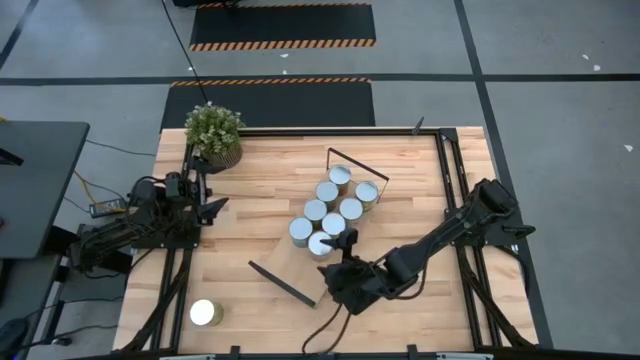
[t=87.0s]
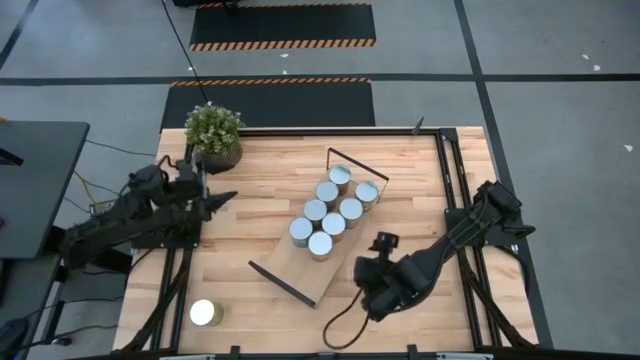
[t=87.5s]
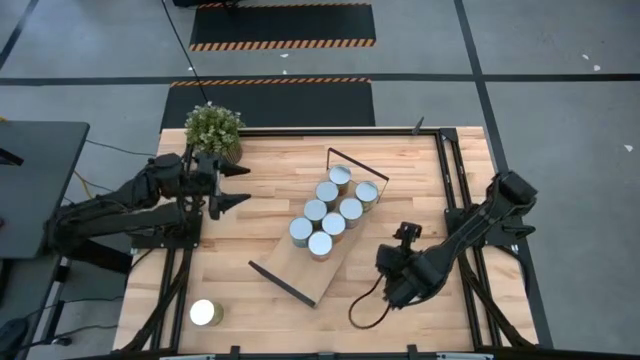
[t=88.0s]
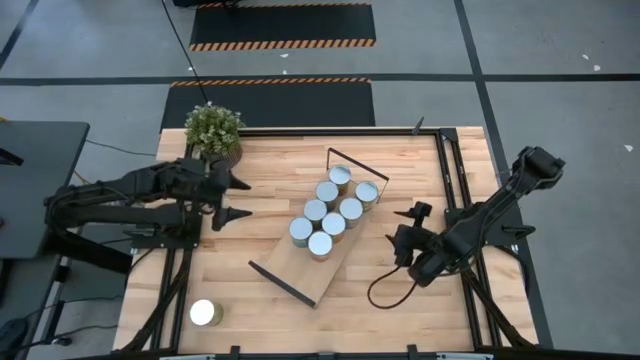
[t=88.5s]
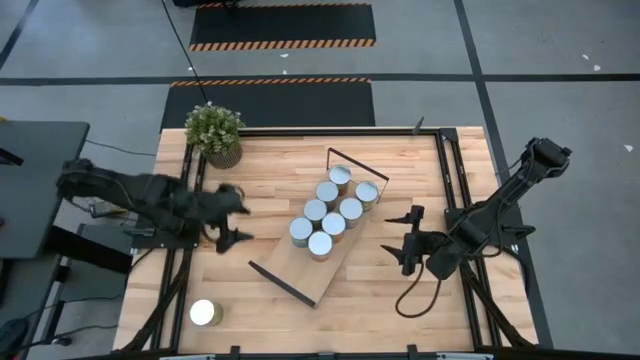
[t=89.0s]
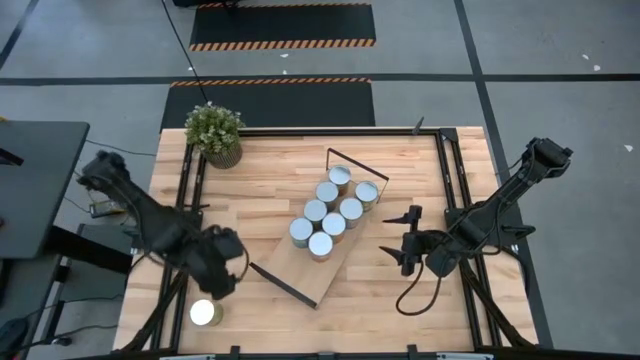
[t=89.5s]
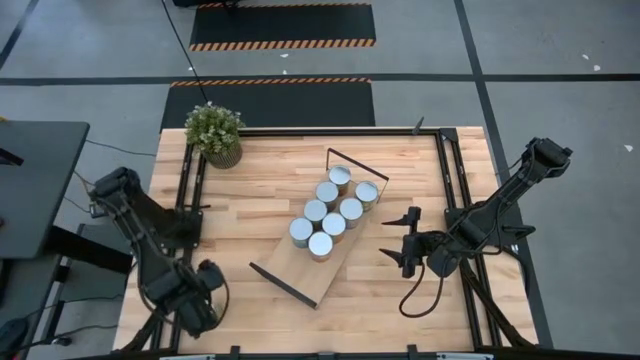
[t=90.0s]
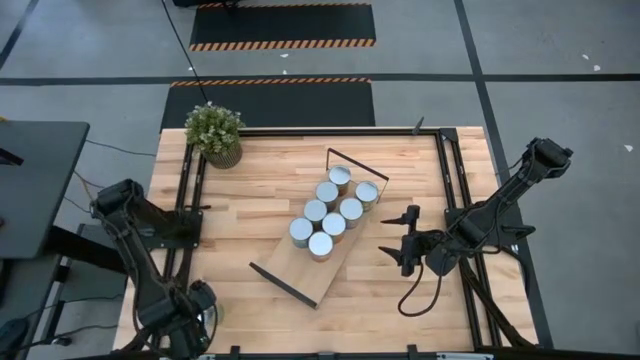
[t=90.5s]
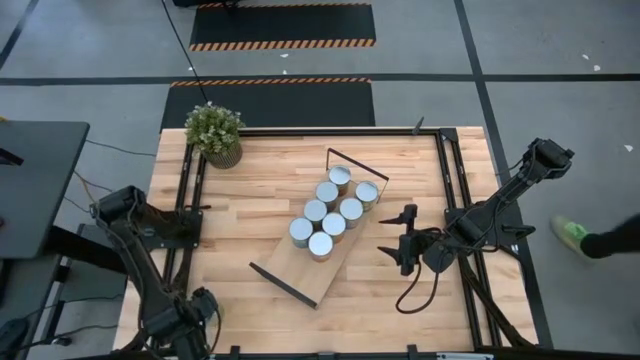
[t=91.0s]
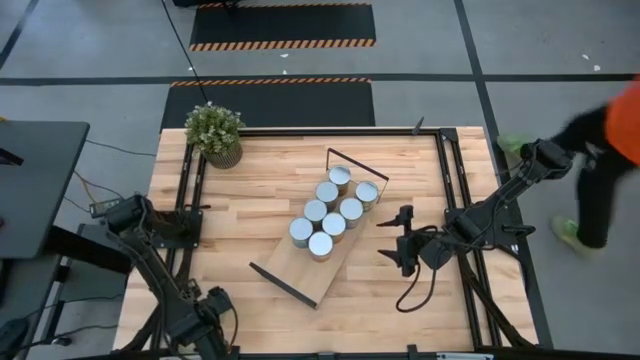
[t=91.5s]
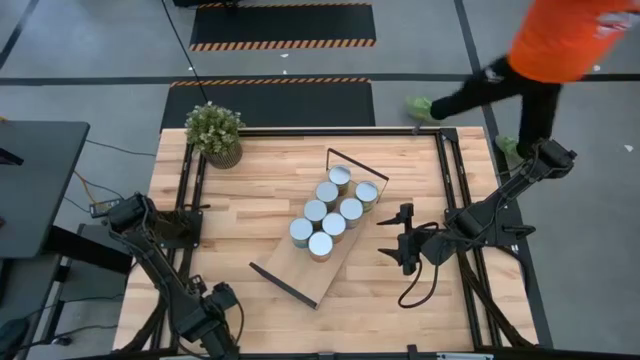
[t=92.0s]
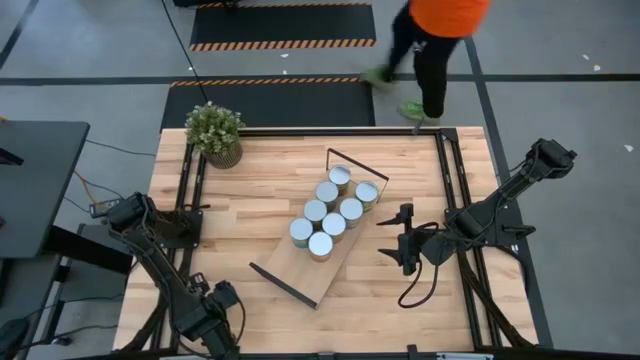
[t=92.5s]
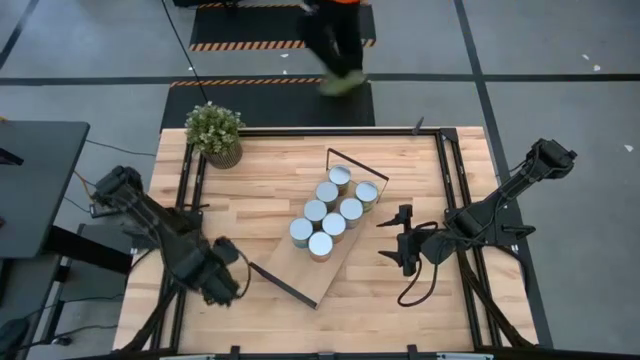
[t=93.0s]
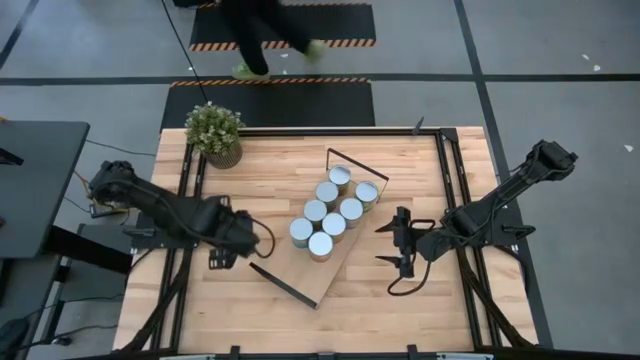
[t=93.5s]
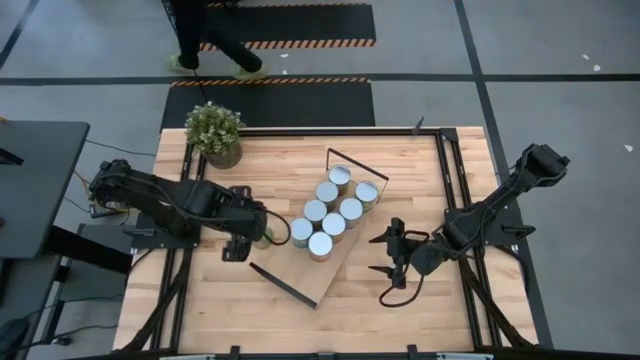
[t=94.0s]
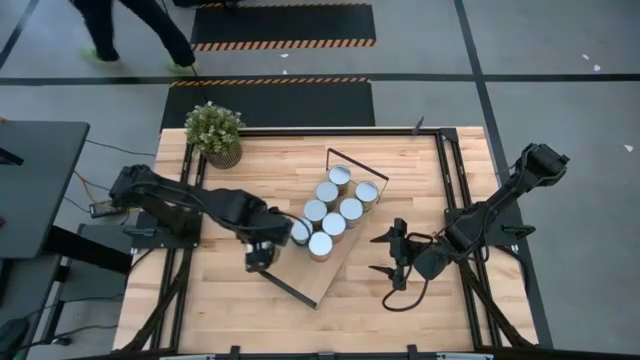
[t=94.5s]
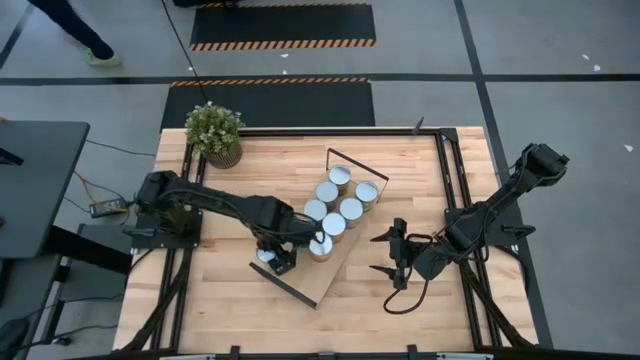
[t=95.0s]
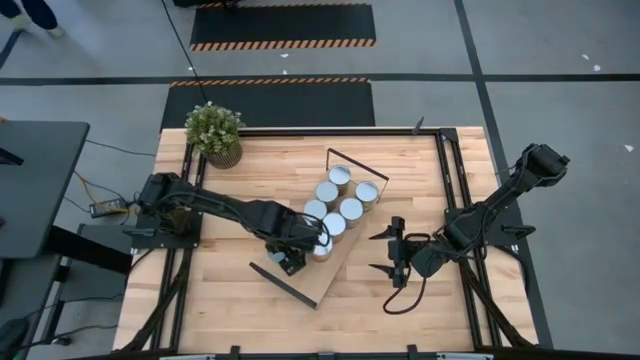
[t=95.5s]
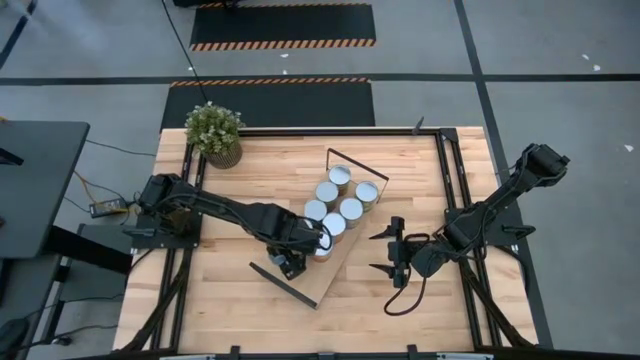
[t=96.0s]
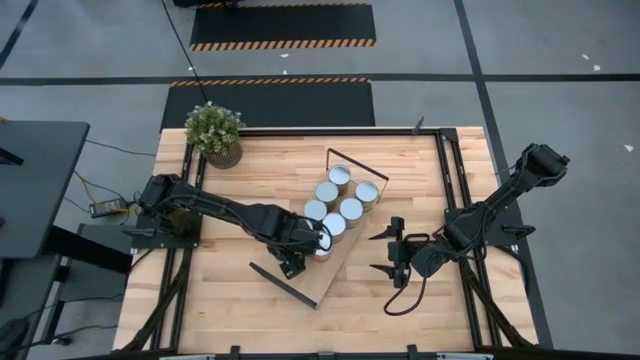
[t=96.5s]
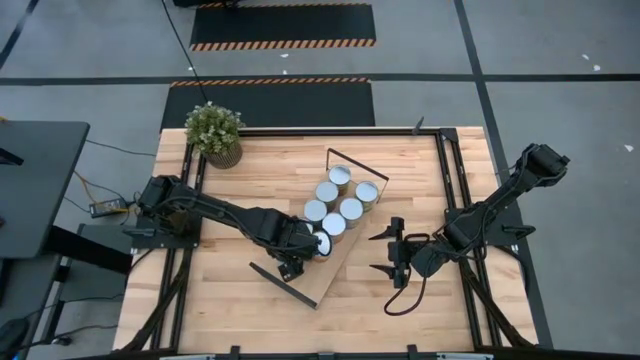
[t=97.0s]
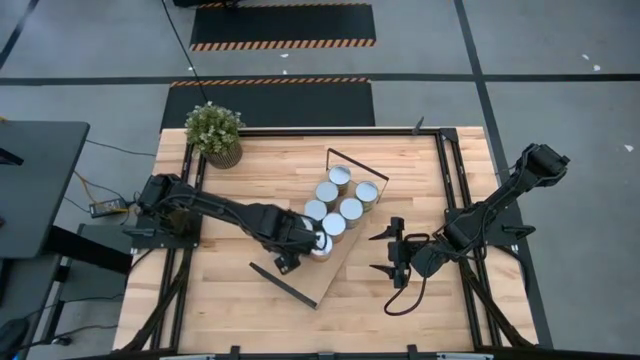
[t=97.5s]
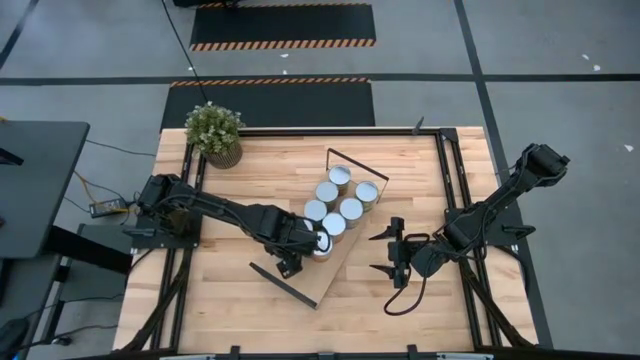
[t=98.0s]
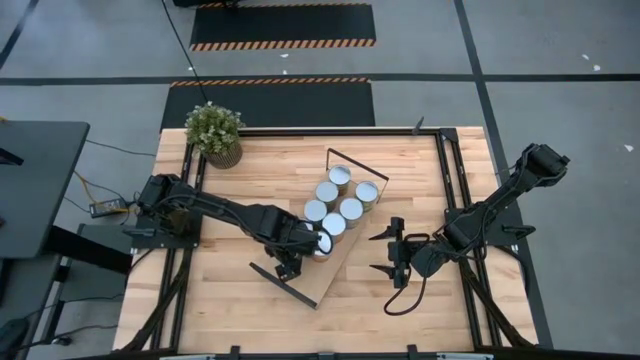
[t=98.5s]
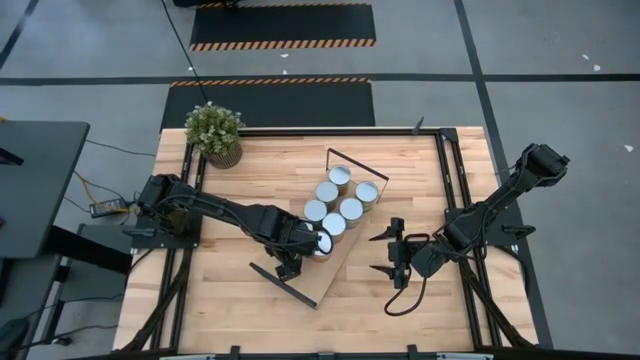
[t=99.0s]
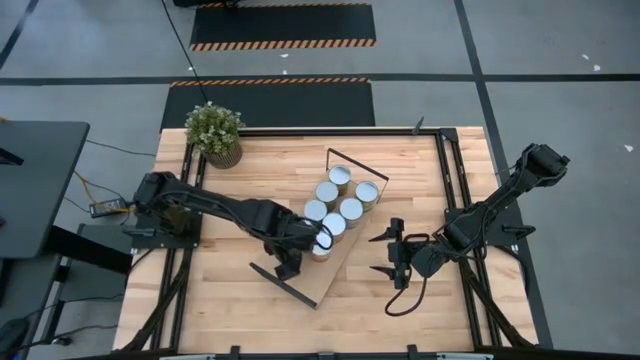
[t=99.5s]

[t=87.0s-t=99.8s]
Task: Pick and place cans onto a shelf
Put the canned oranges on the shelf

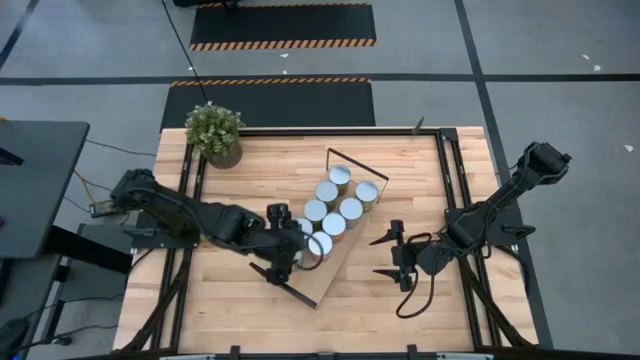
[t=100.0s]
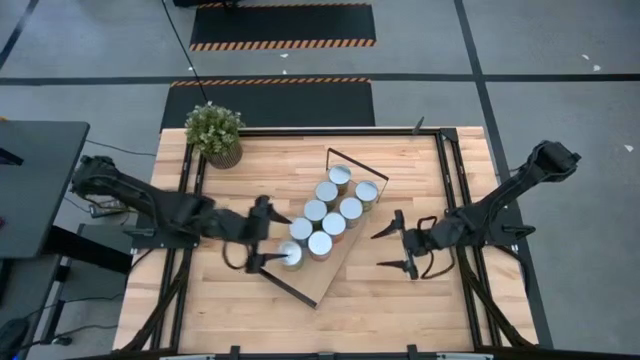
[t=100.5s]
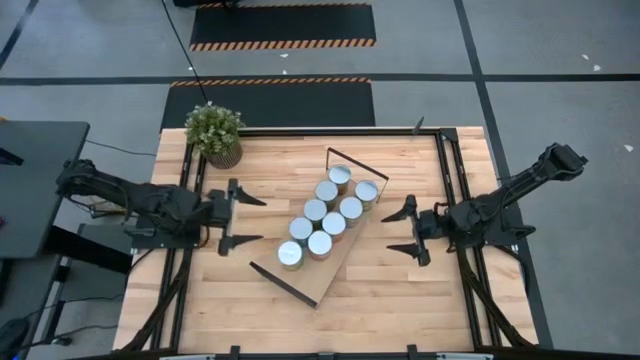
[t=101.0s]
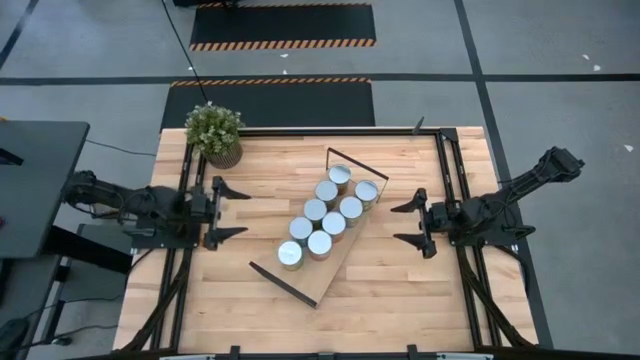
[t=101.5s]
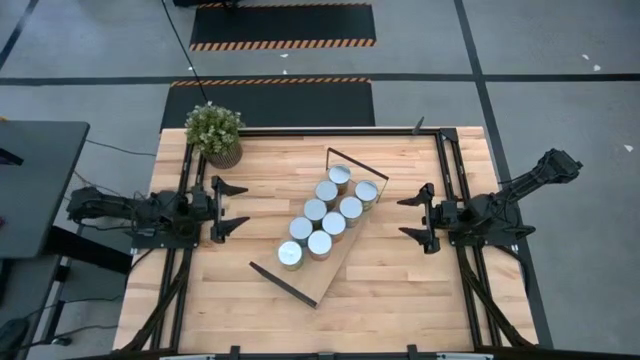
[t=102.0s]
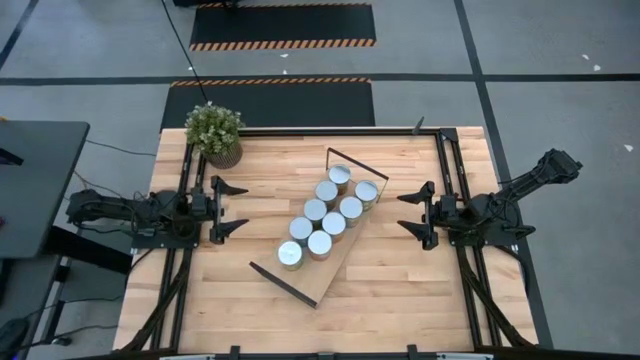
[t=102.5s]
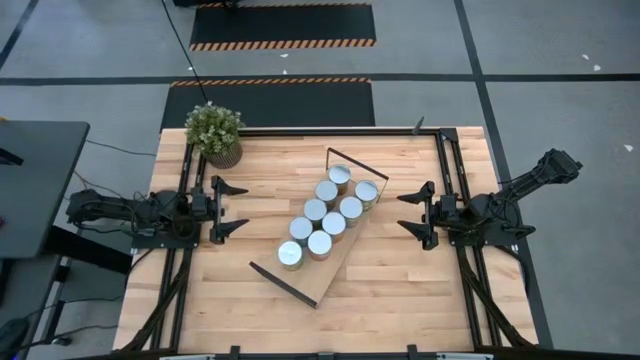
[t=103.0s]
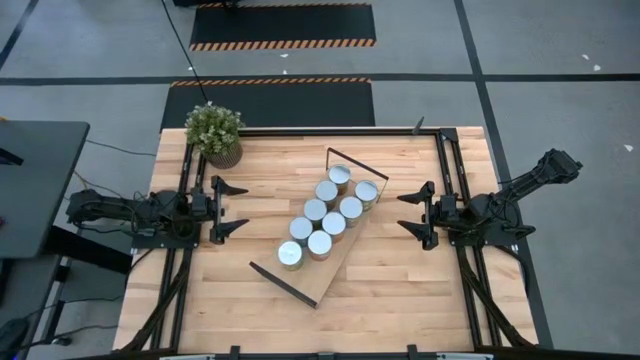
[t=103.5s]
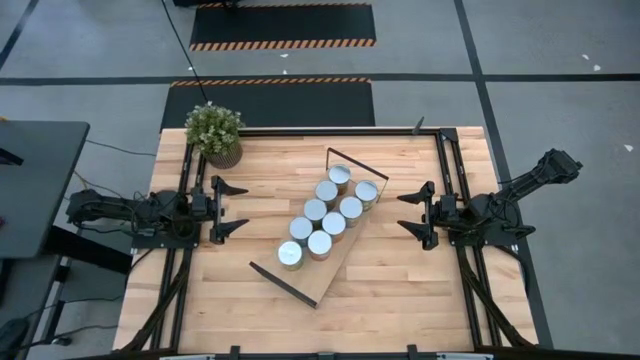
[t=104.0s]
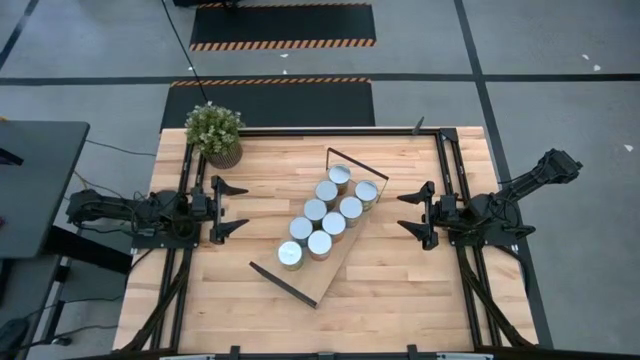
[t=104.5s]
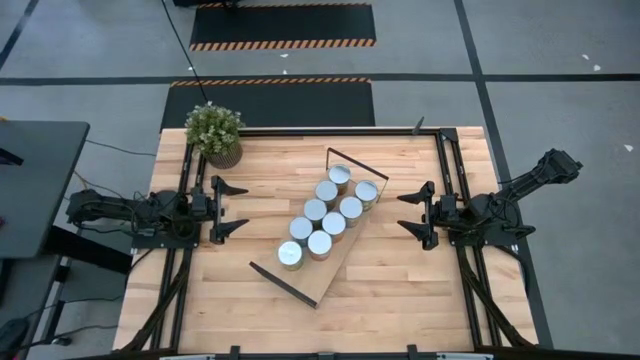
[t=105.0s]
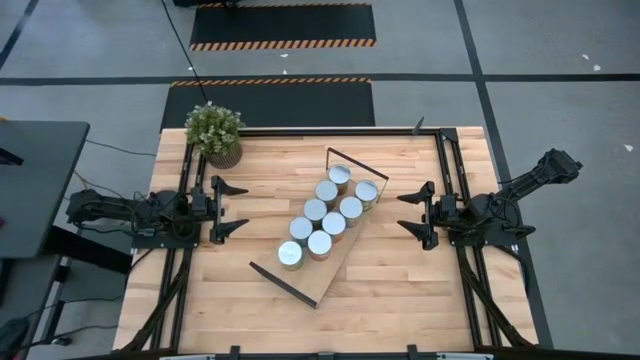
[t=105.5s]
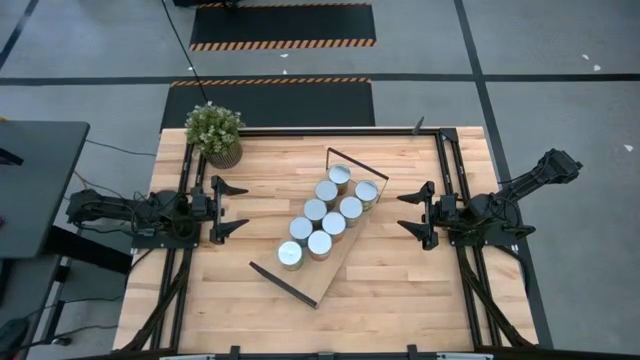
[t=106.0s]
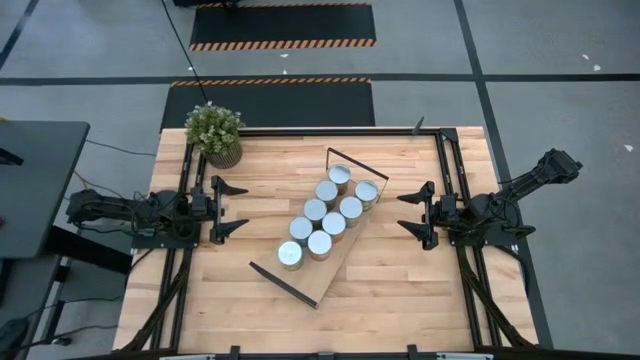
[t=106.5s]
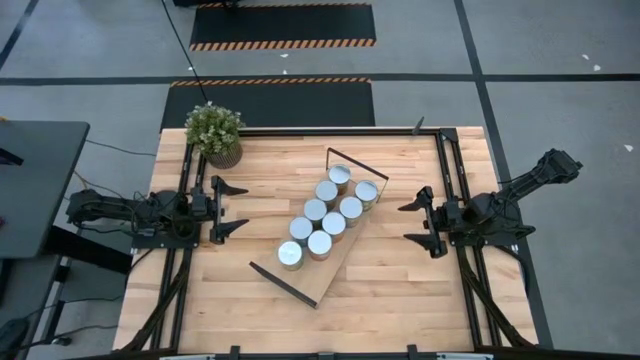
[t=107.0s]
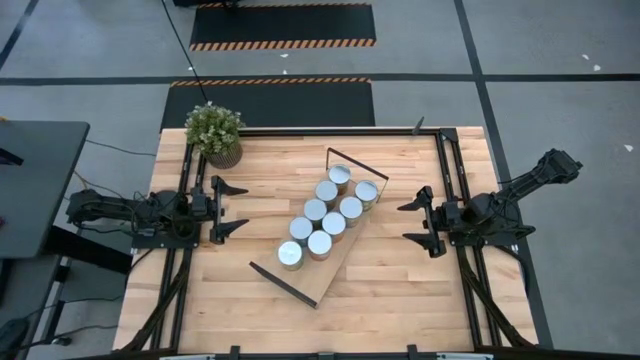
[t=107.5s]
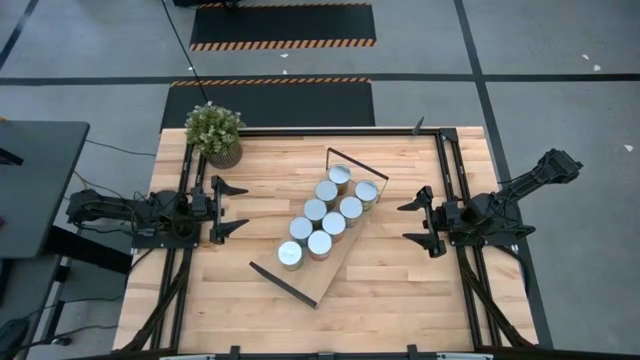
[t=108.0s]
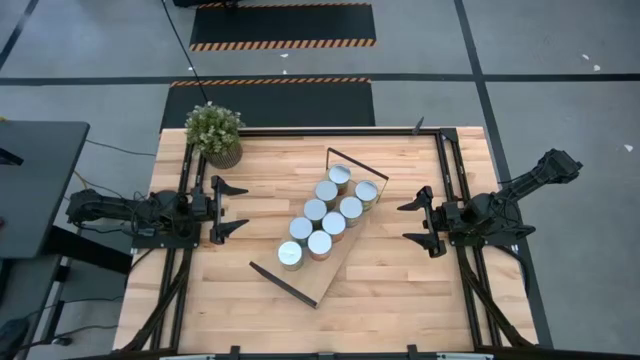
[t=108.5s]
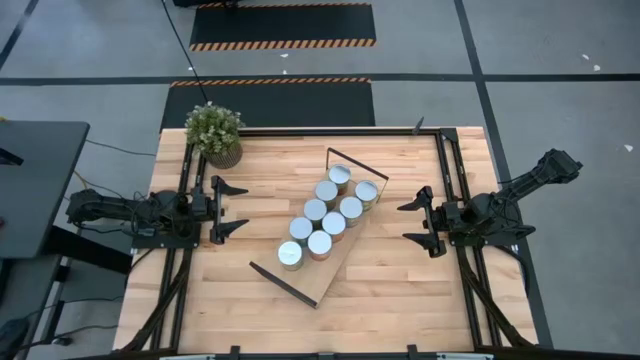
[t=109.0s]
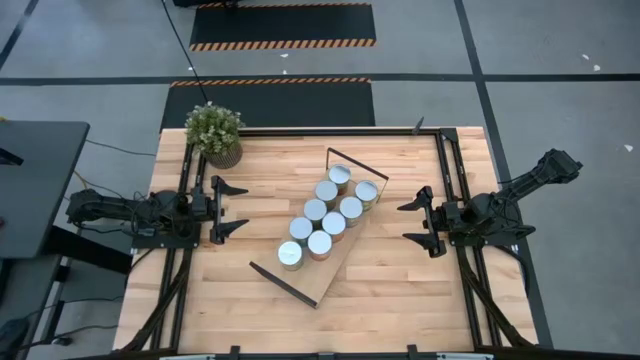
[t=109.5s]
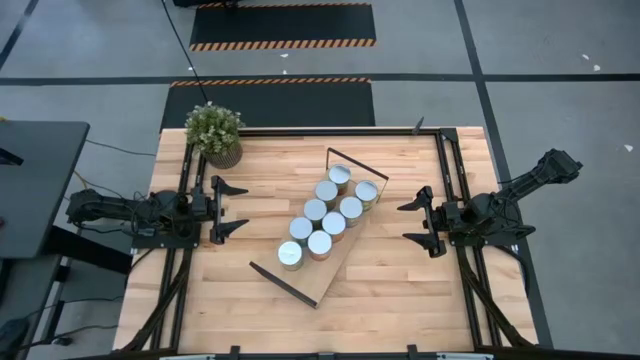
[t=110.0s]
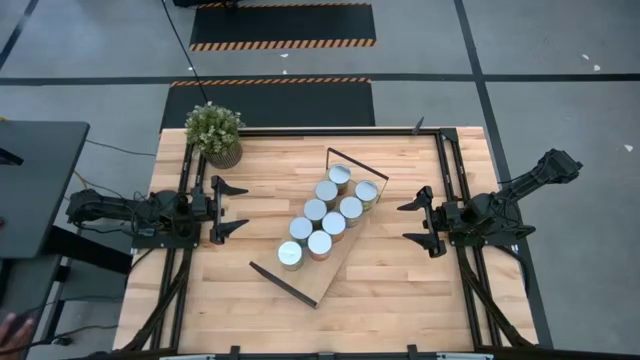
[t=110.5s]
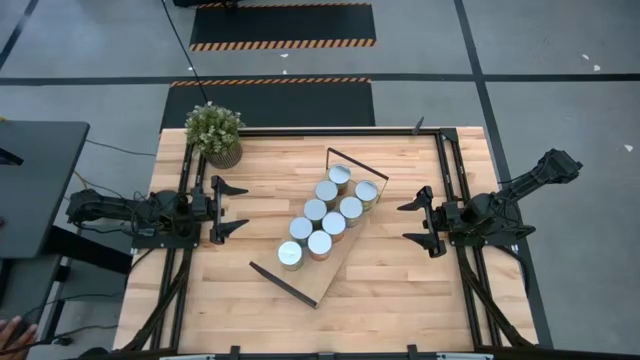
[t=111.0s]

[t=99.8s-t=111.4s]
Return to Home Position
